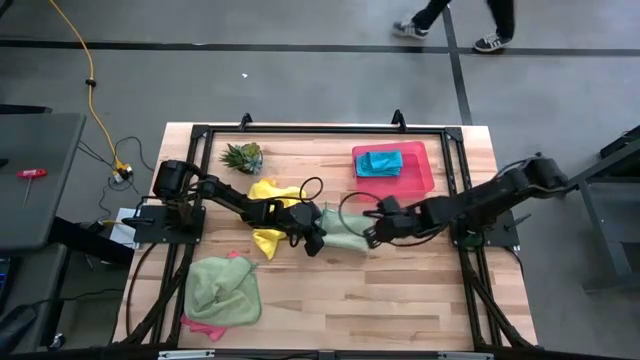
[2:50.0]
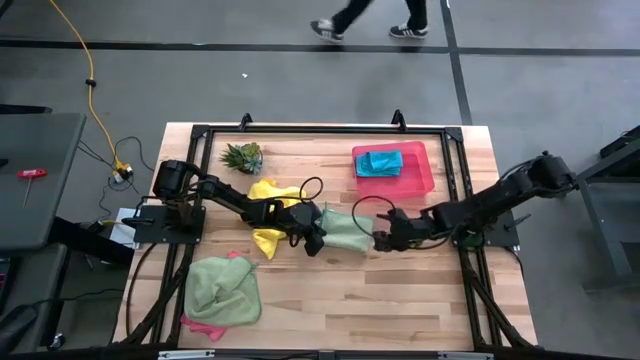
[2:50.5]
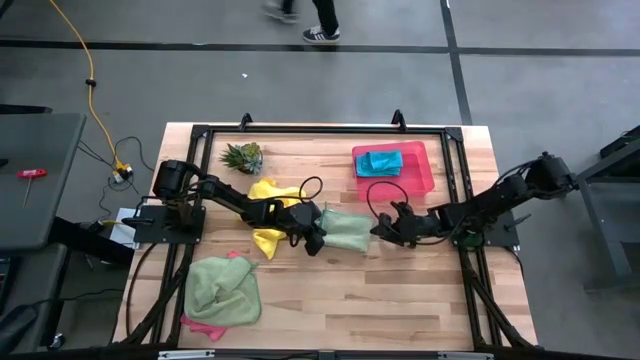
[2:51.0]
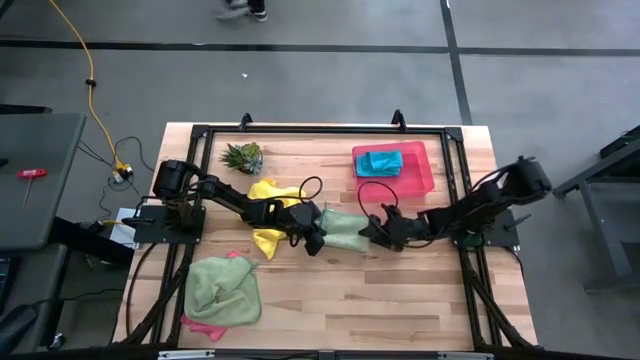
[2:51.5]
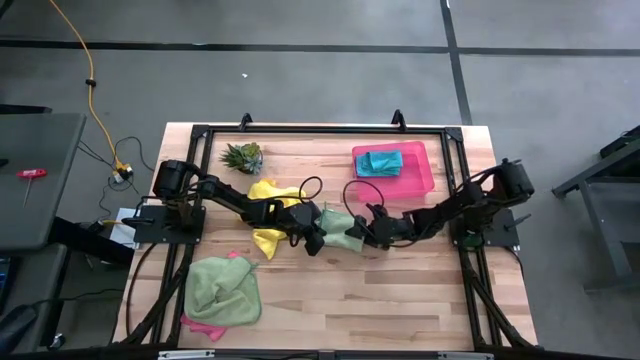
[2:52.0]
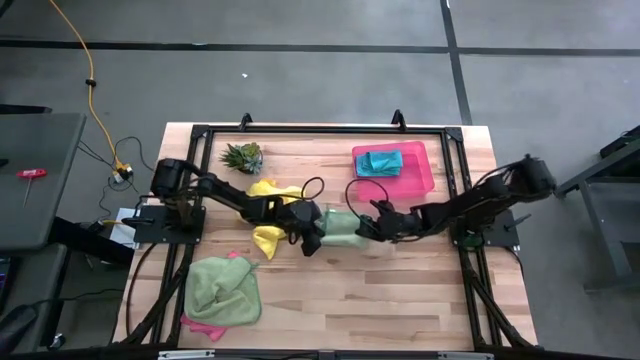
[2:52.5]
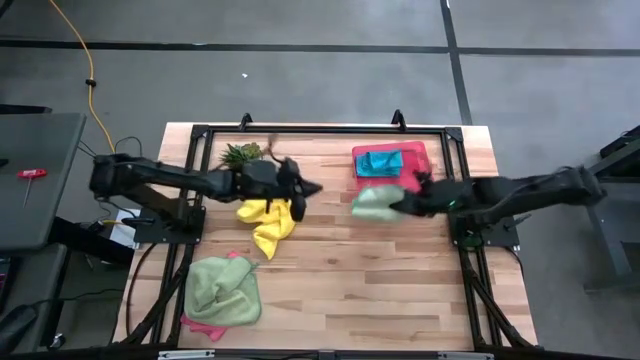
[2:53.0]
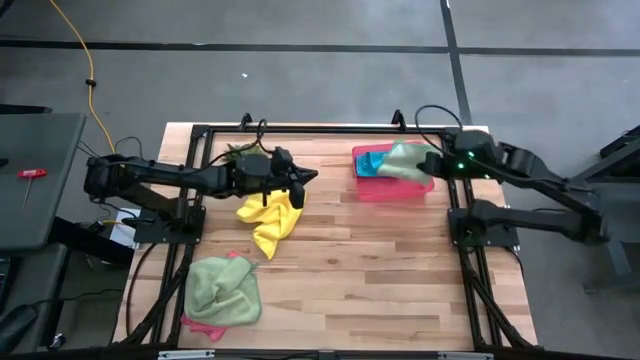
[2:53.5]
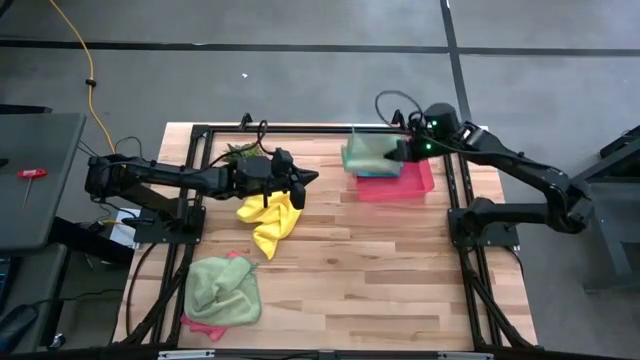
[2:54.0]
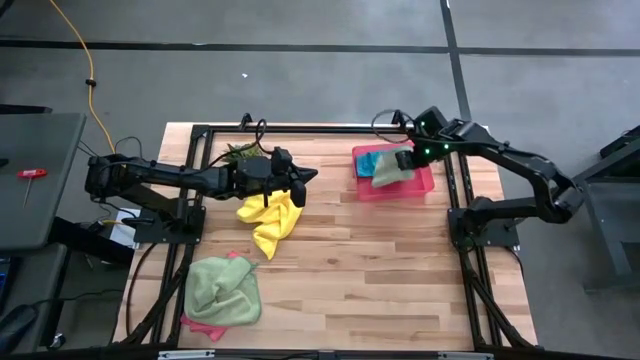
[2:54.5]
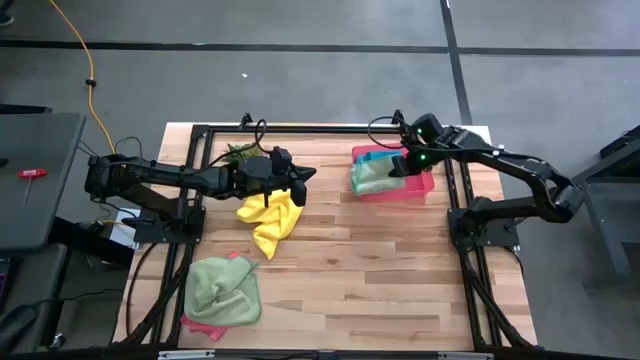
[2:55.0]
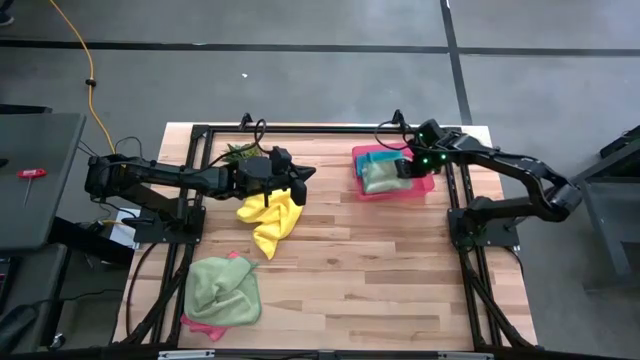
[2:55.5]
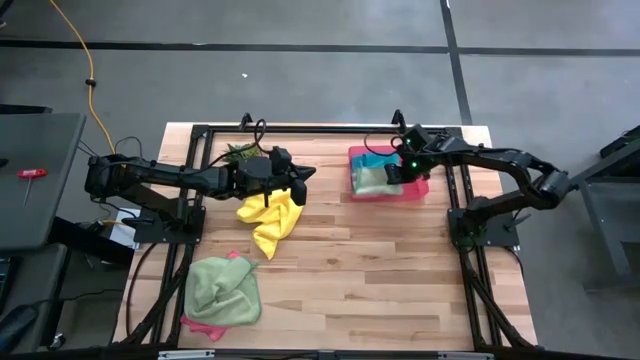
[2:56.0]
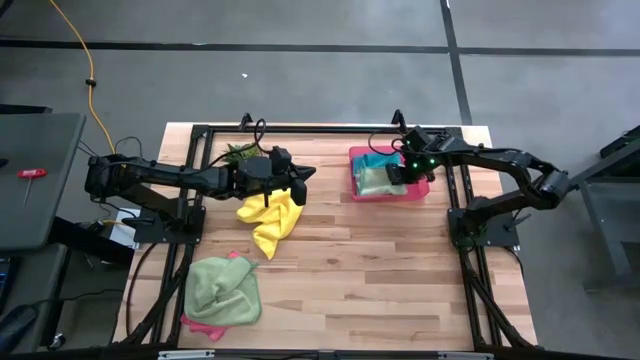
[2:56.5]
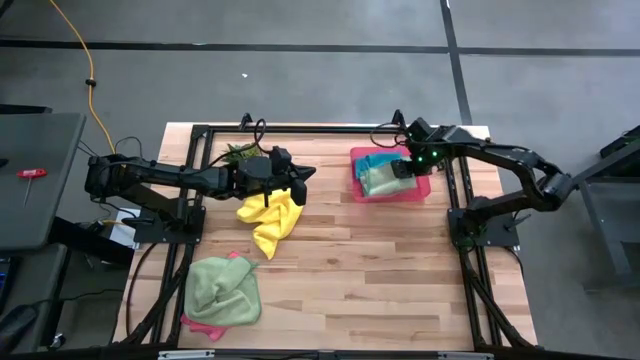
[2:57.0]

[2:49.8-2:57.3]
Task: Fold microfiber towels
Put the folded green microfiber cloth into the pink bin
